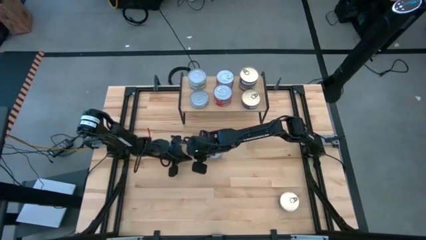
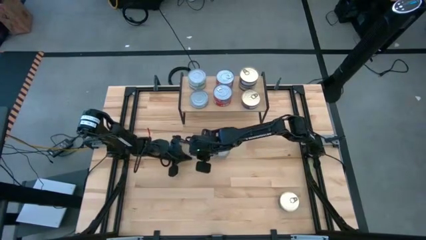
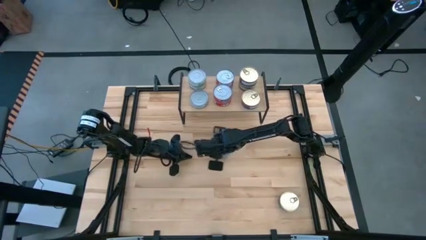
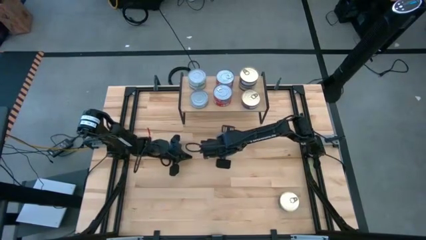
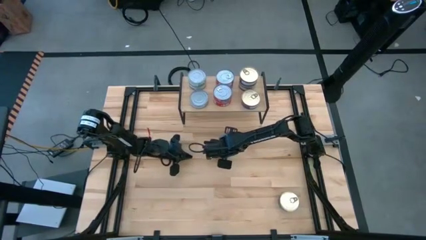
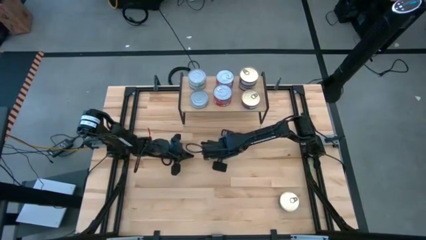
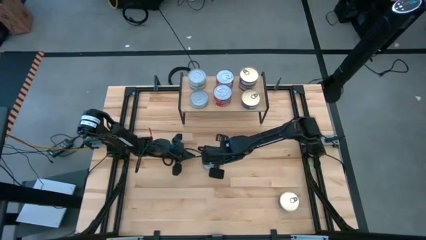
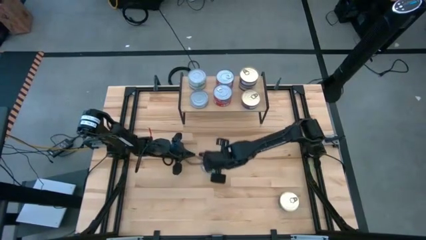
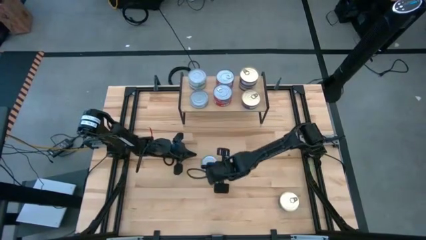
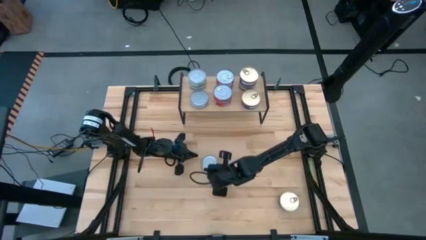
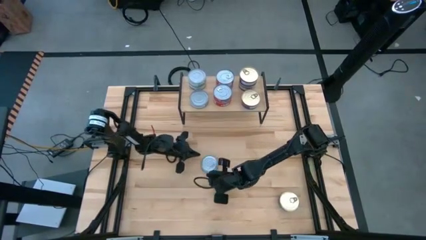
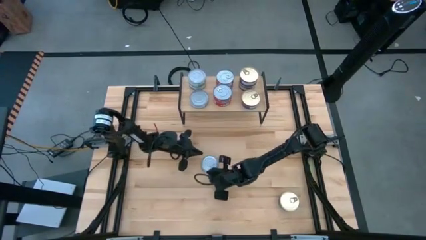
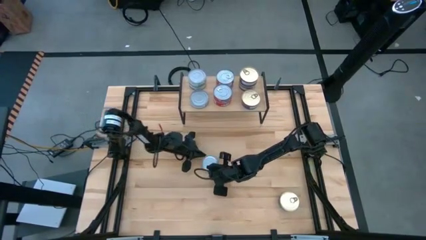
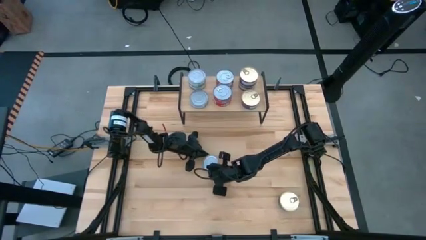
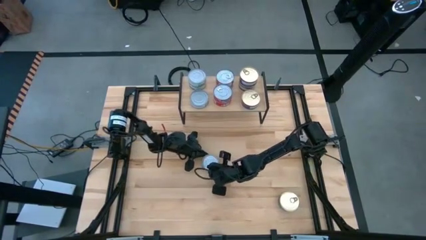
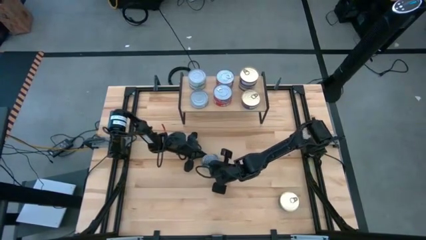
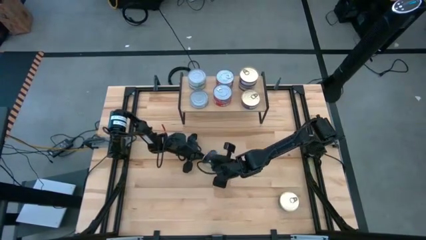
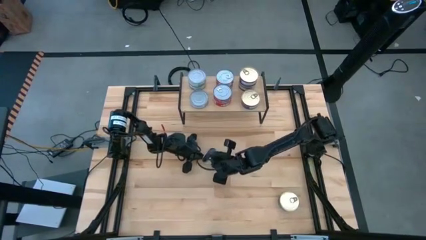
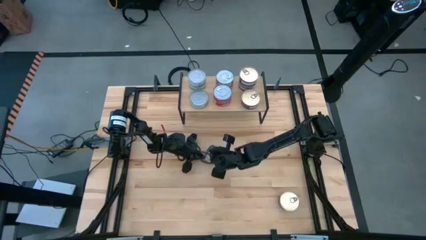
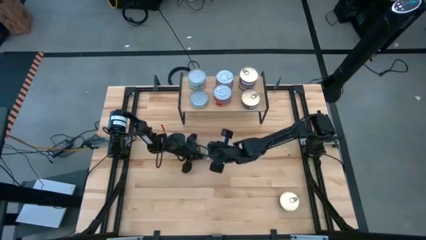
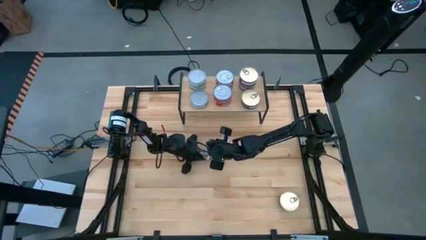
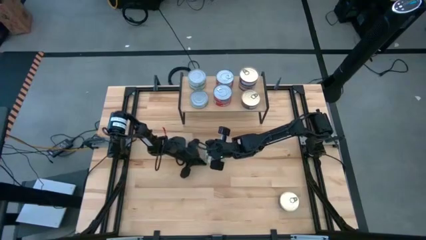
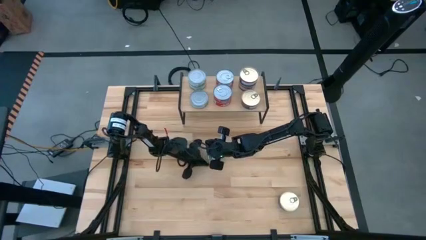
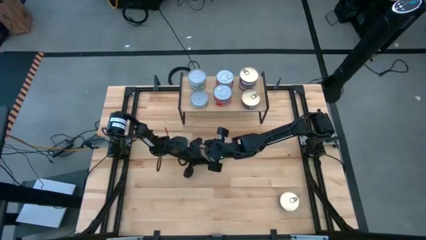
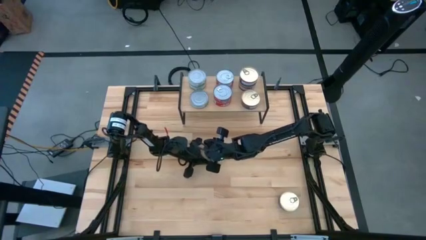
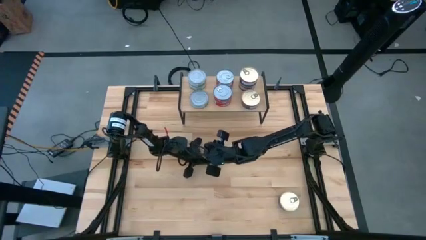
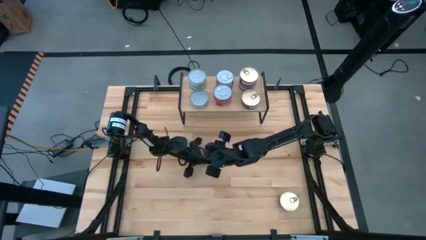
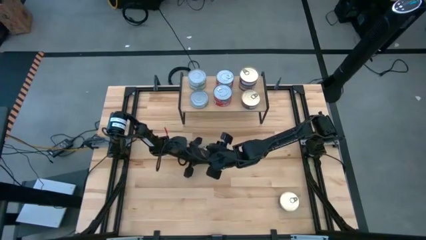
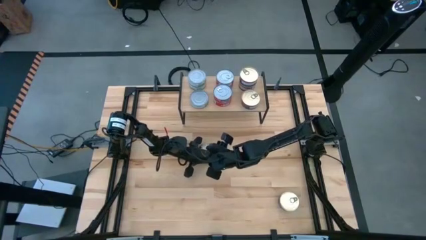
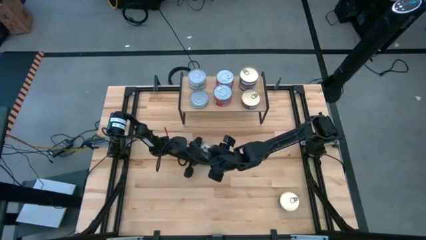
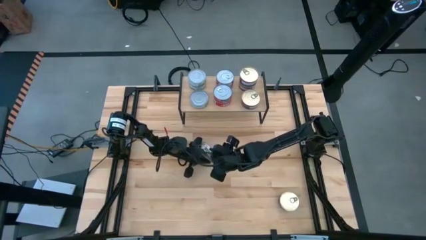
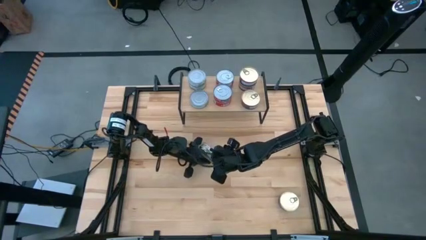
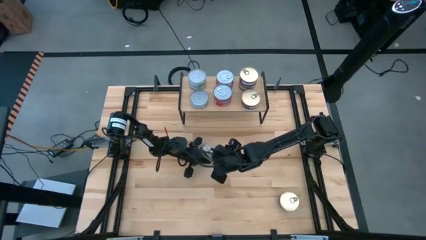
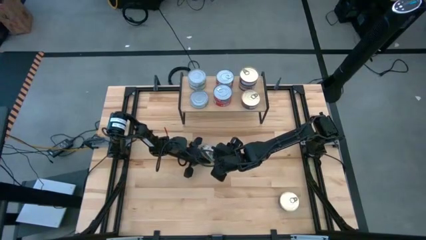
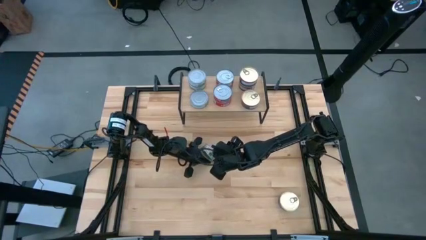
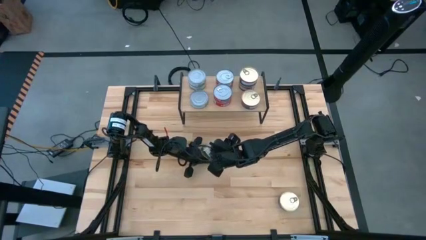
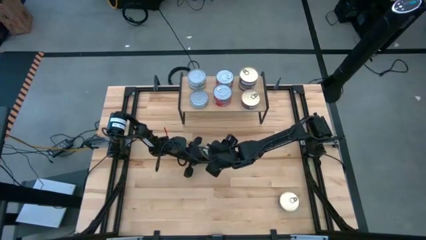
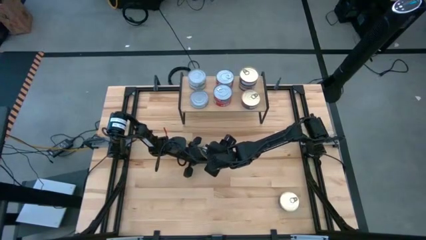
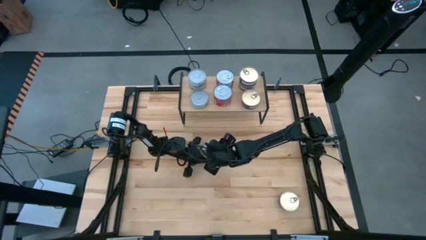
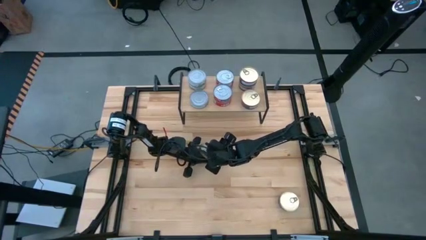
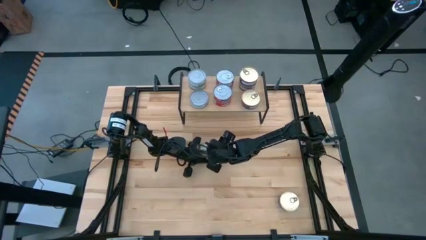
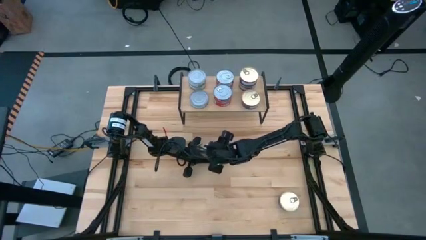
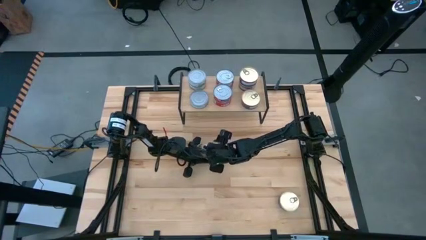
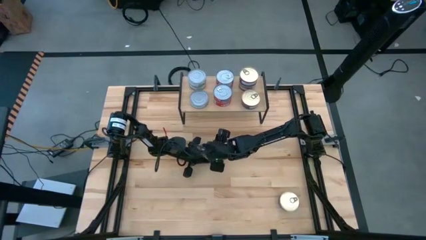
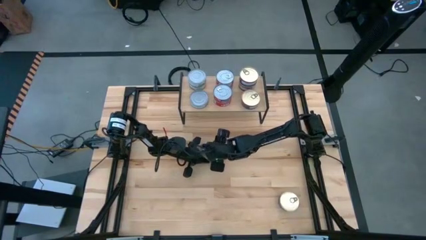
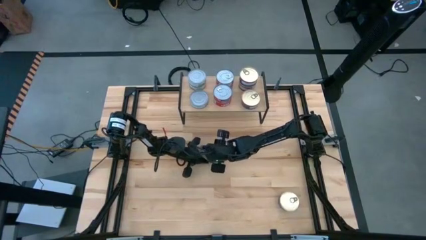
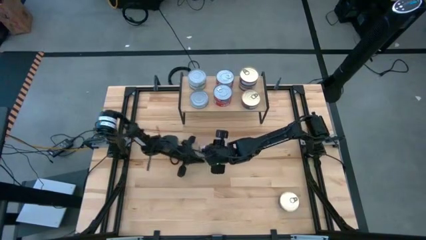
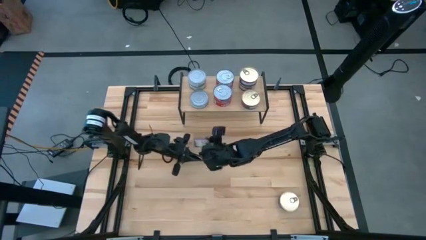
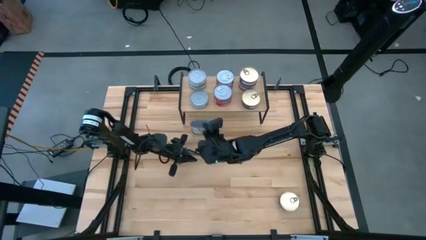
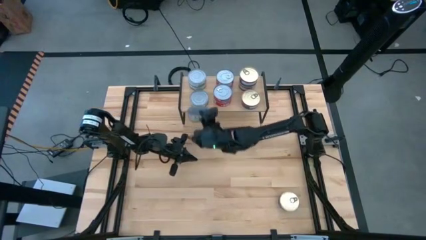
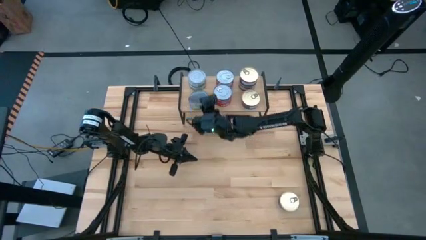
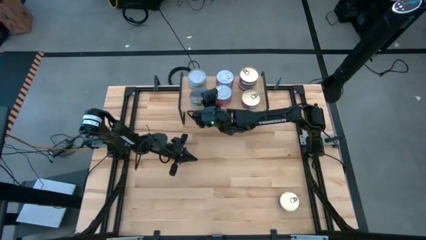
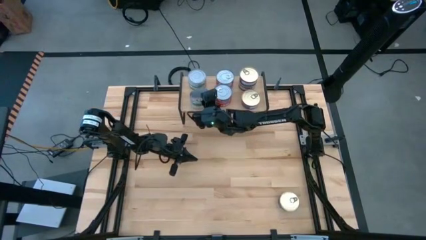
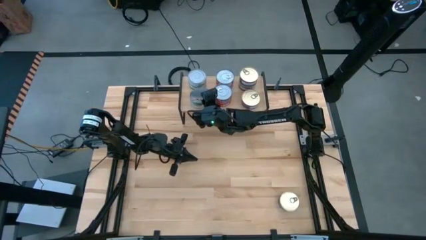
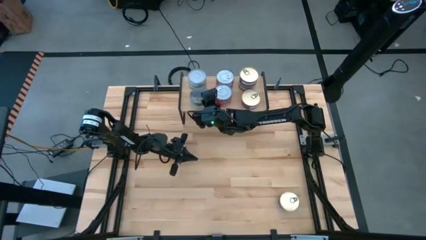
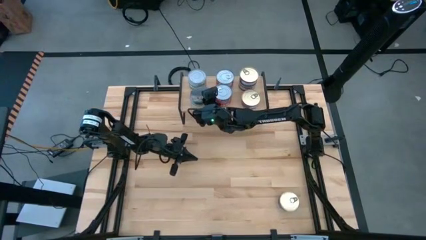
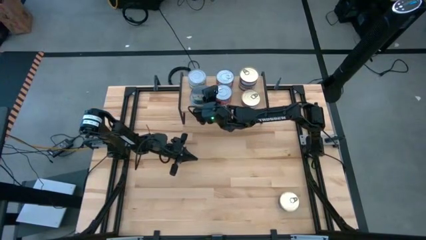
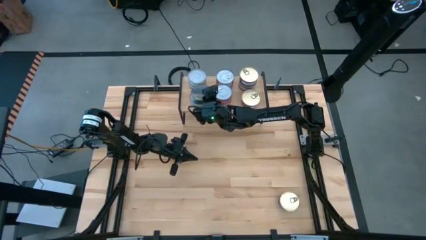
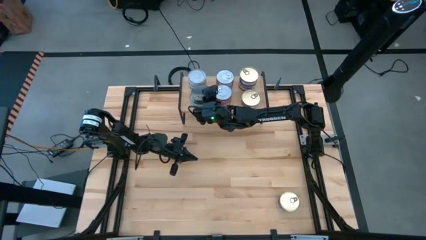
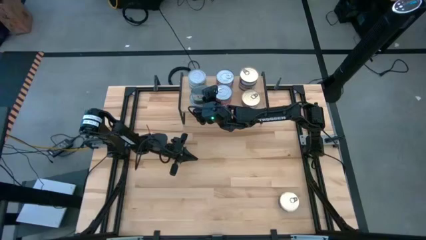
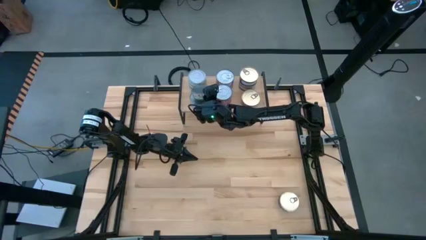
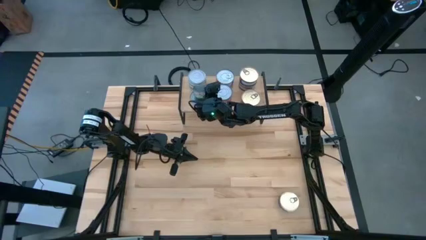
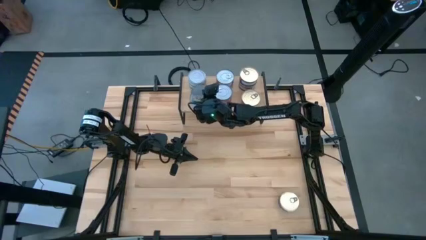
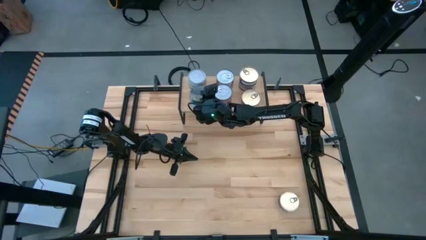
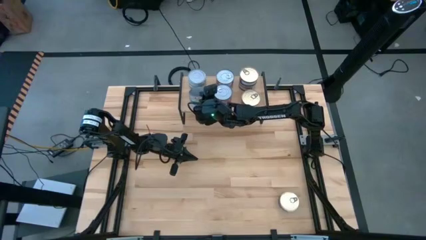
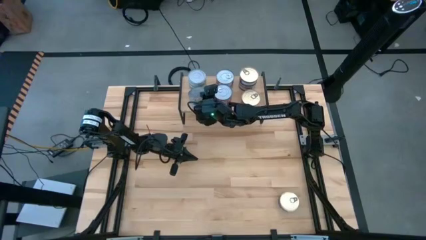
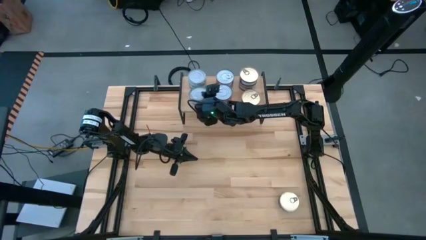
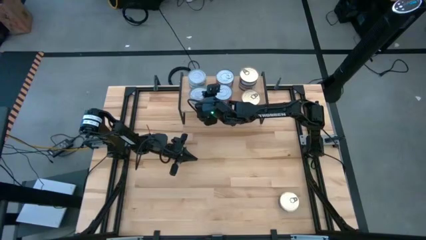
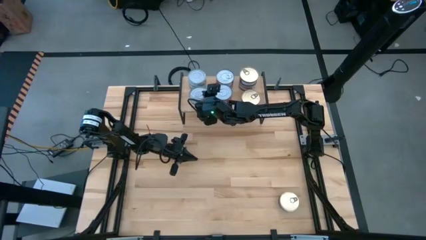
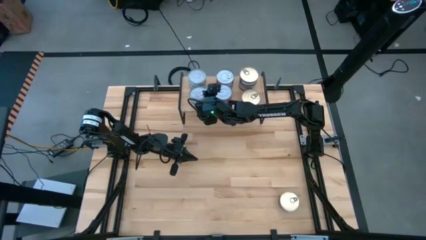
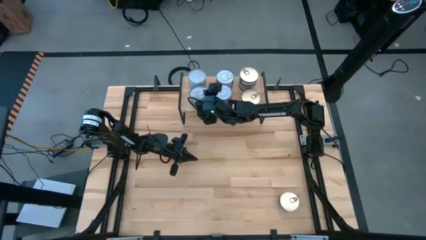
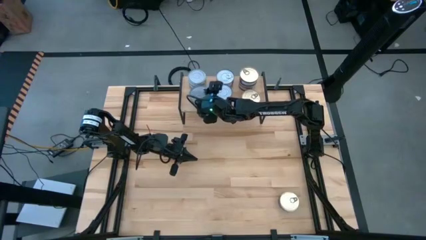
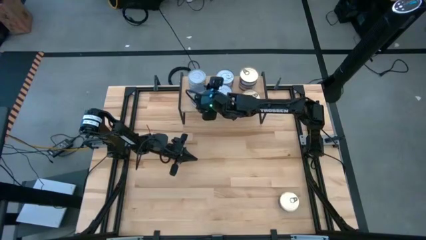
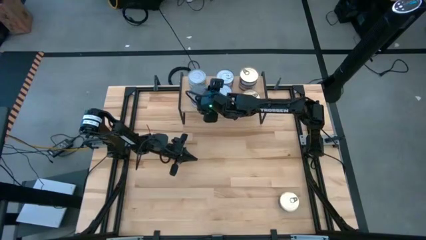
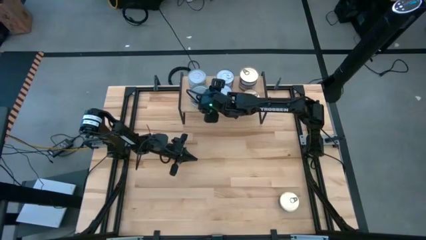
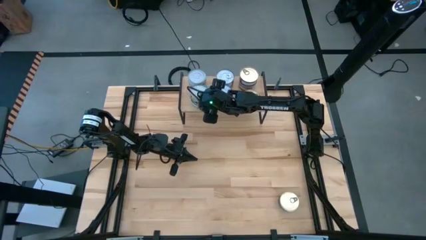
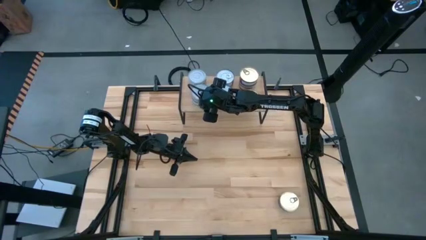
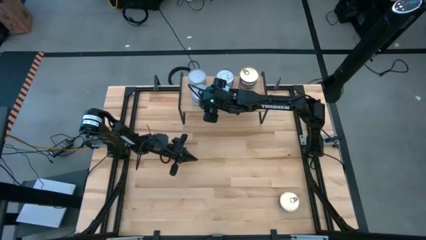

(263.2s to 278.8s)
Task: Stack canned seafood by type on shelf
Stack the green and white tuna can on top of the green and white tuna can on the shelf

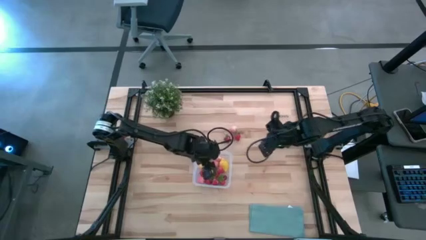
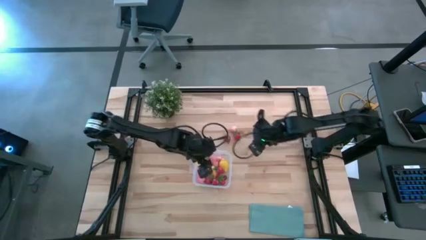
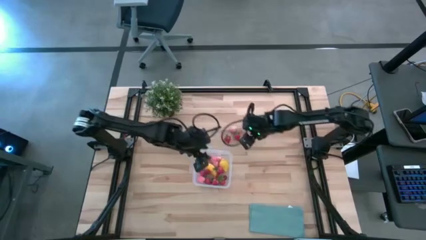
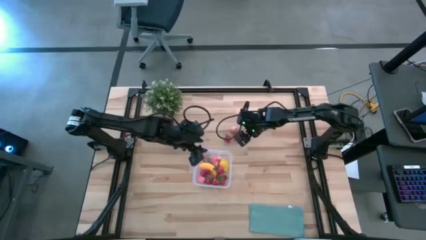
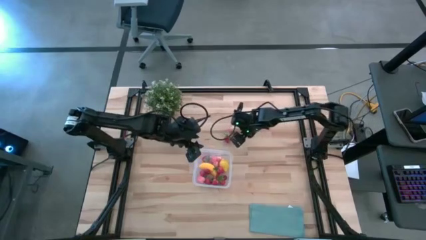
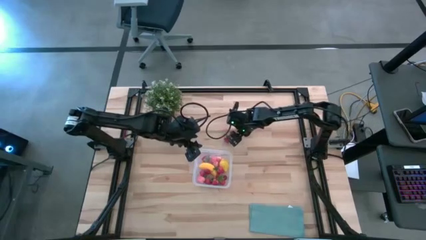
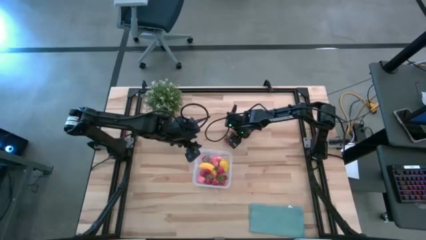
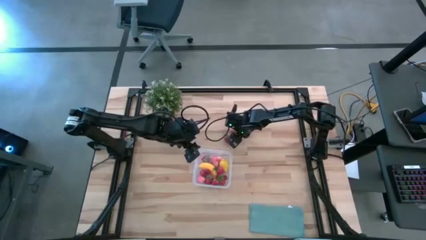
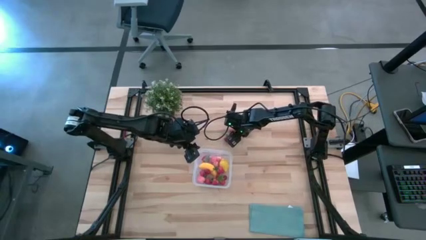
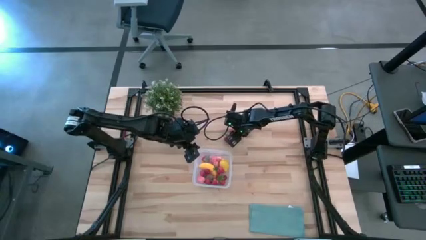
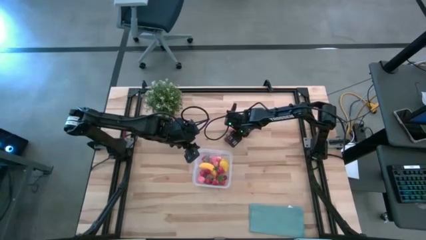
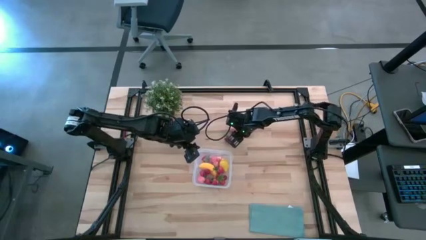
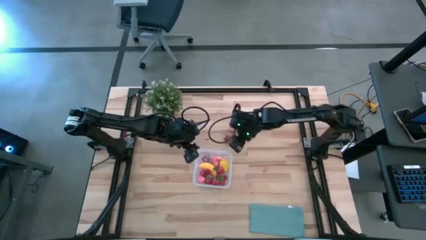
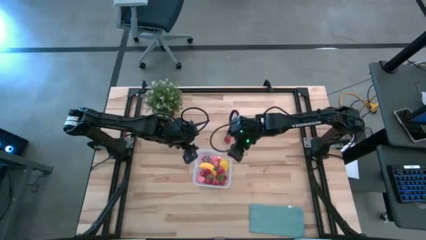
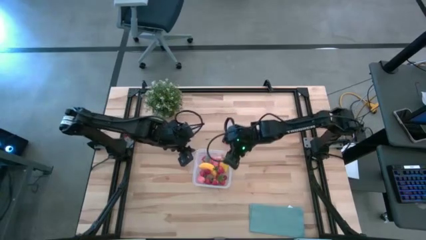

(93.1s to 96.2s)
Task: Pick and placing Produce into tupperware
Put the red strawberry into the transparent container
